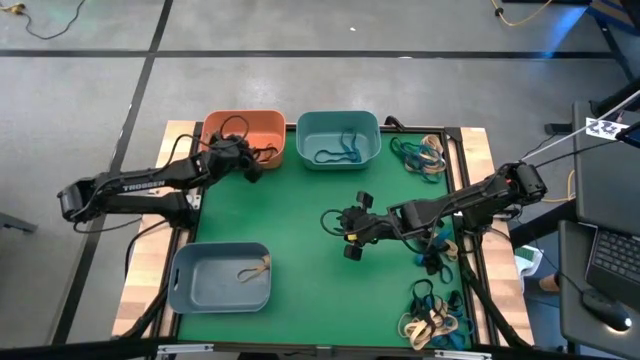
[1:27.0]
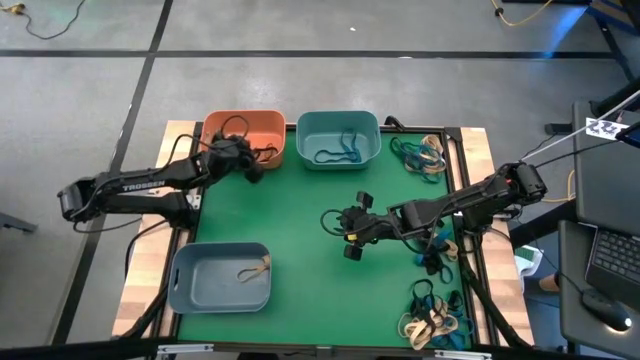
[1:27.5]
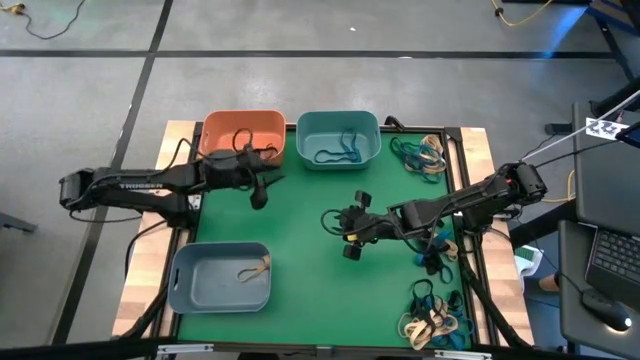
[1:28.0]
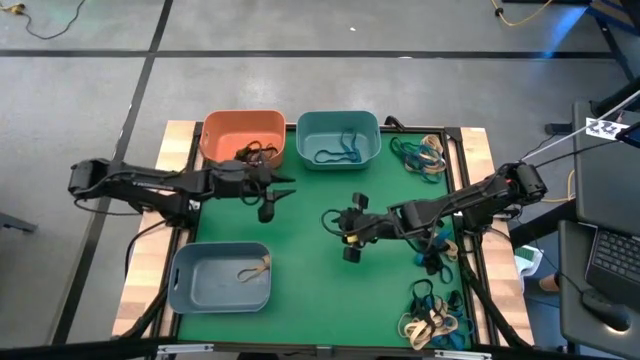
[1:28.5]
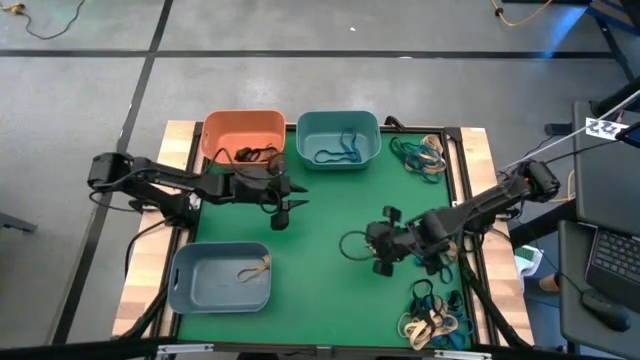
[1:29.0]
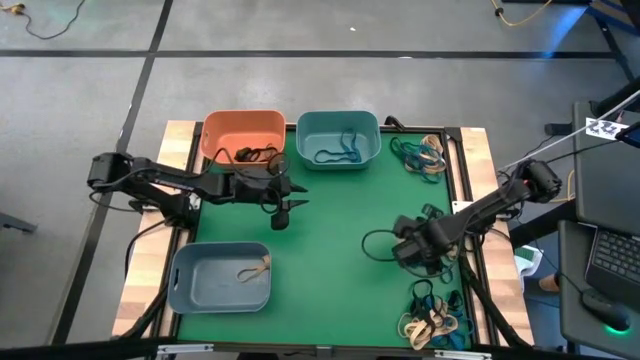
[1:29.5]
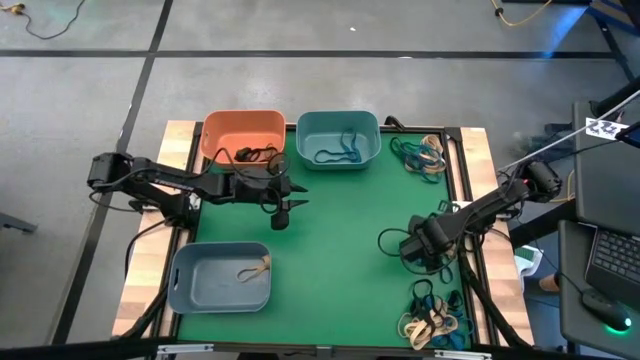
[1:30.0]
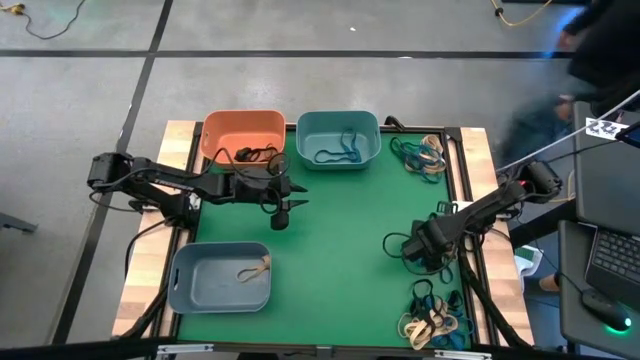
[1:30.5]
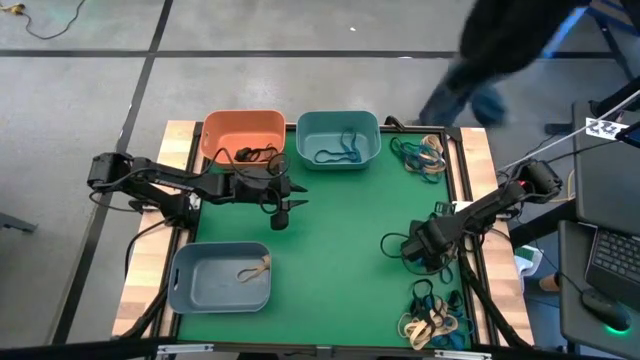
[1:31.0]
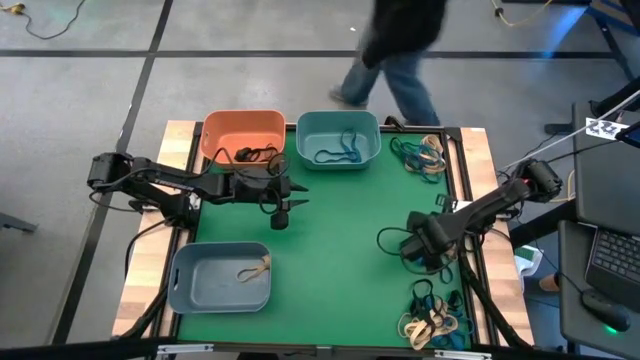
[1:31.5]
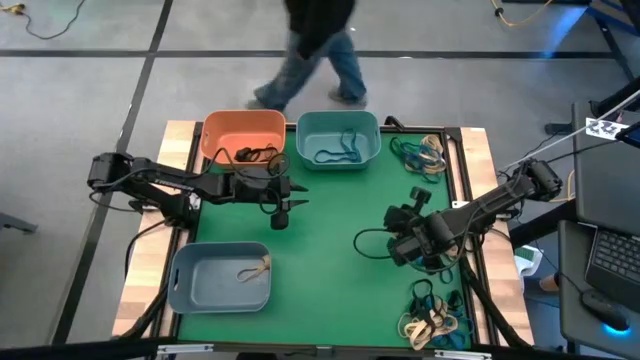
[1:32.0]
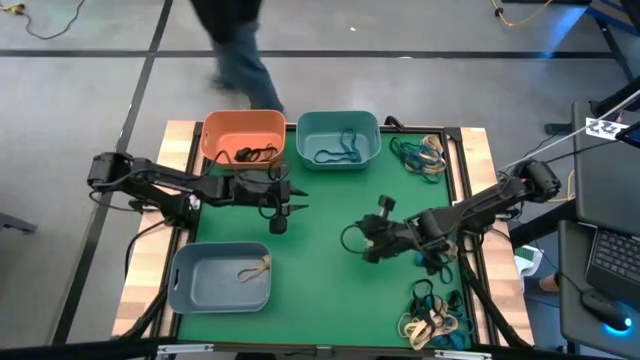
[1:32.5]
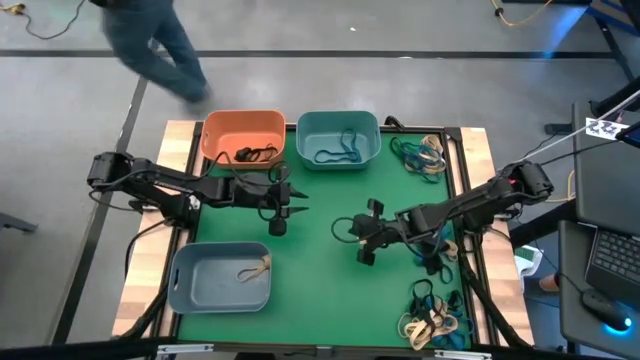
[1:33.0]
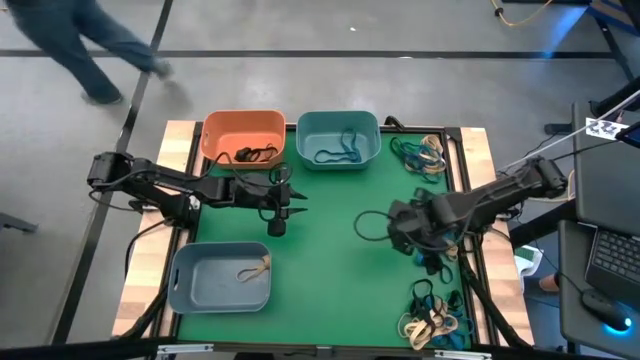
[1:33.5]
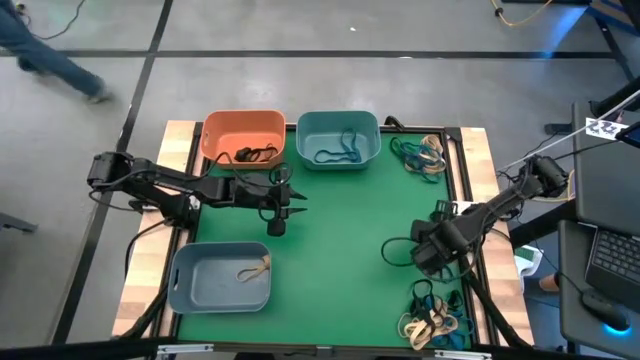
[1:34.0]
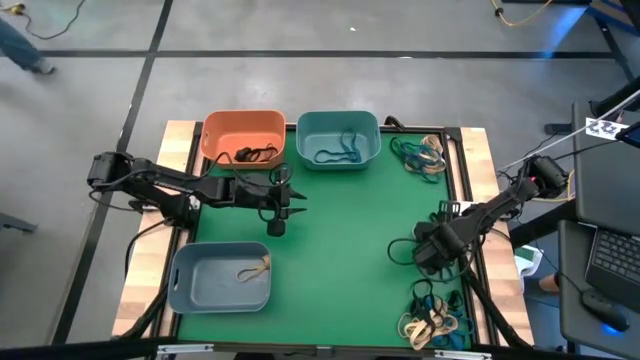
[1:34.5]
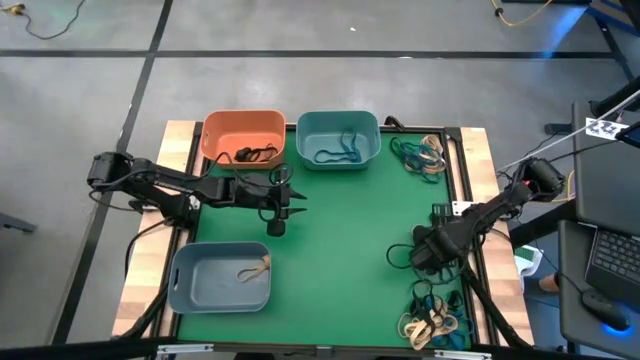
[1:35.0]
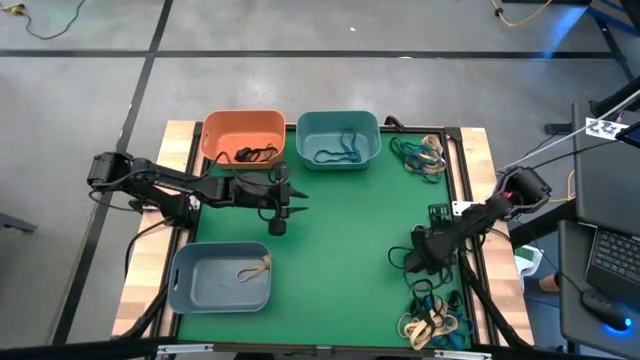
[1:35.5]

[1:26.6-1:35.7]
Task: Sort rubber bands into baskets
Put the blue rubber band into the green bin

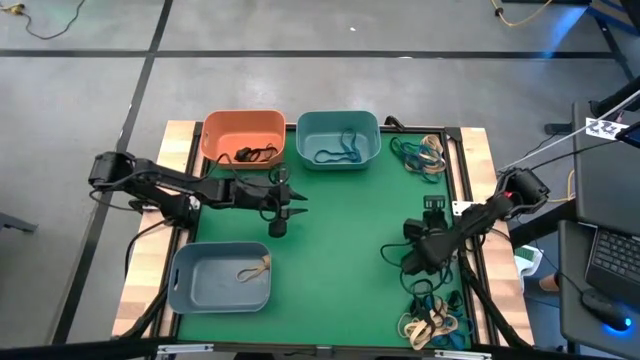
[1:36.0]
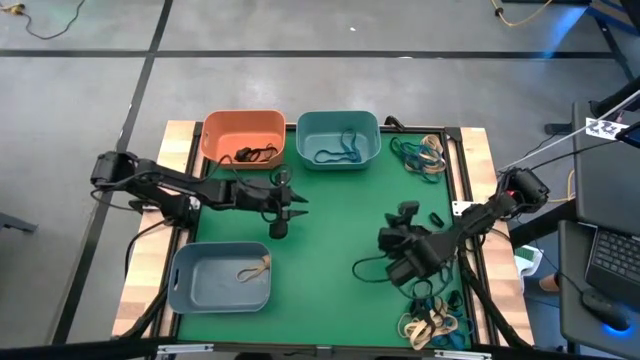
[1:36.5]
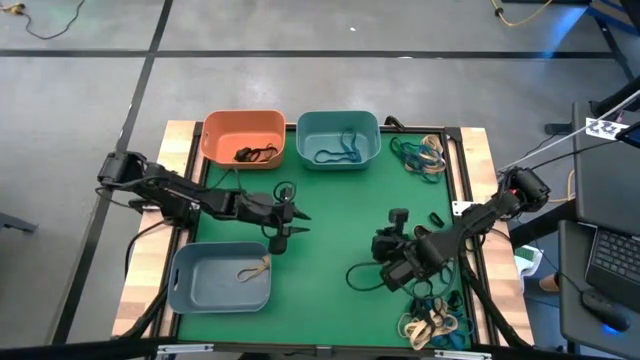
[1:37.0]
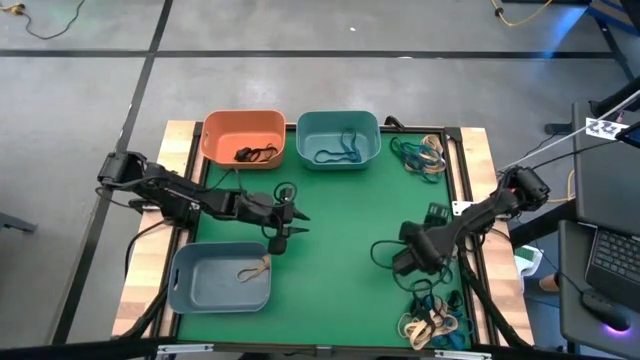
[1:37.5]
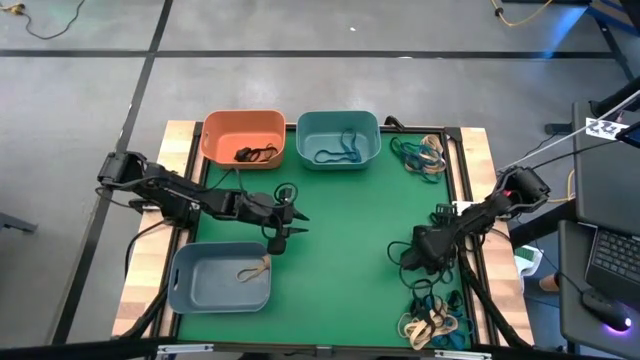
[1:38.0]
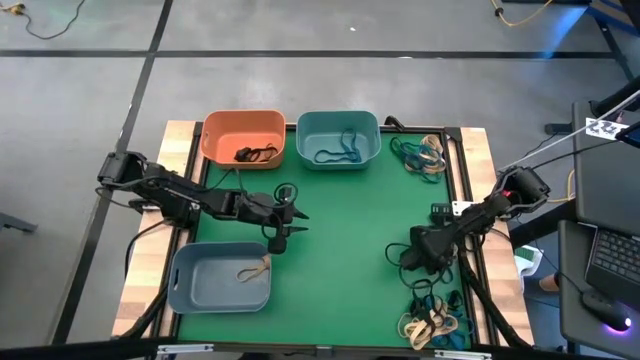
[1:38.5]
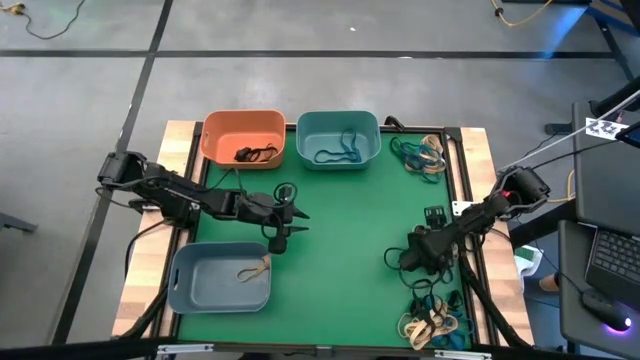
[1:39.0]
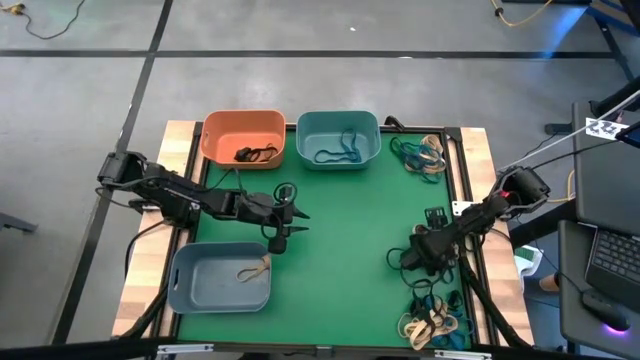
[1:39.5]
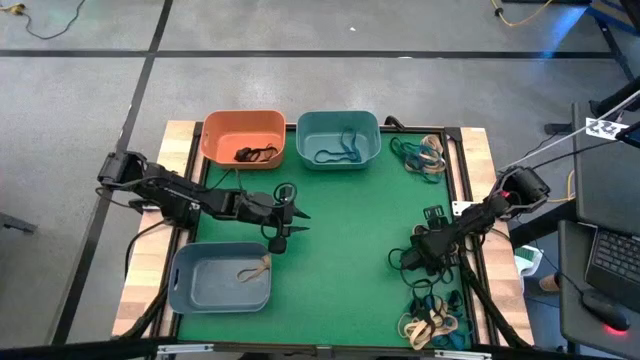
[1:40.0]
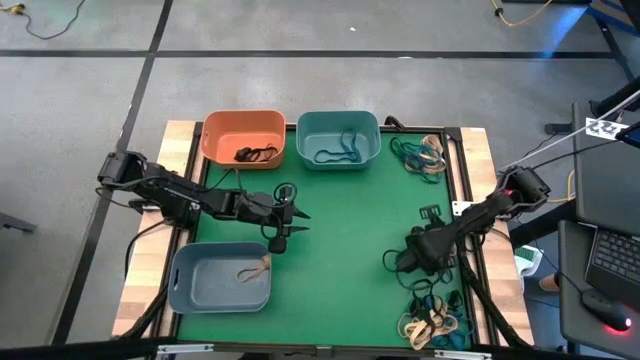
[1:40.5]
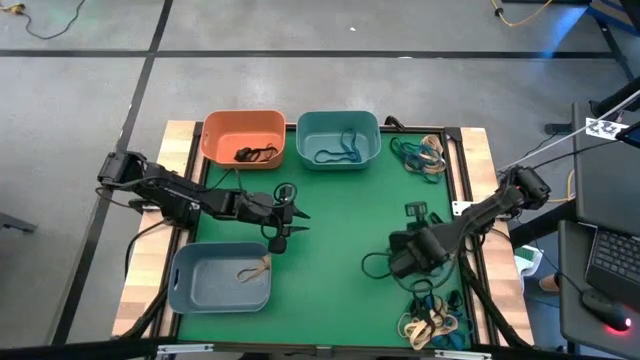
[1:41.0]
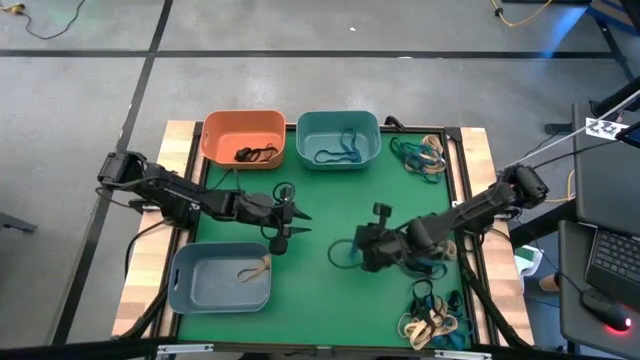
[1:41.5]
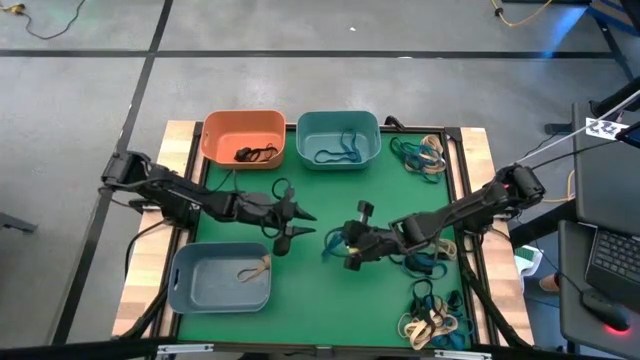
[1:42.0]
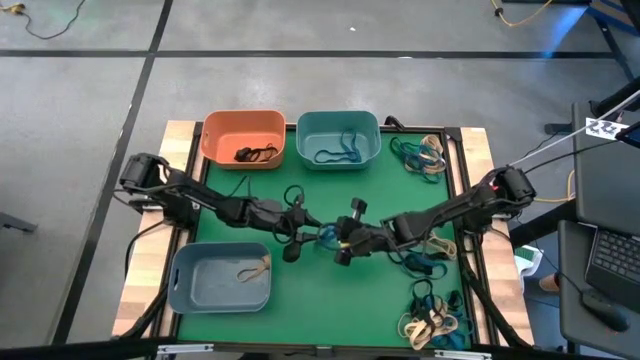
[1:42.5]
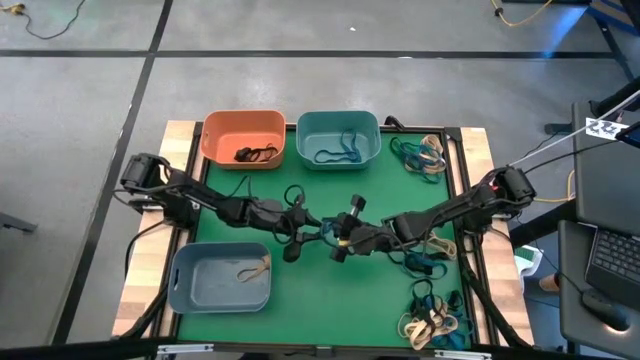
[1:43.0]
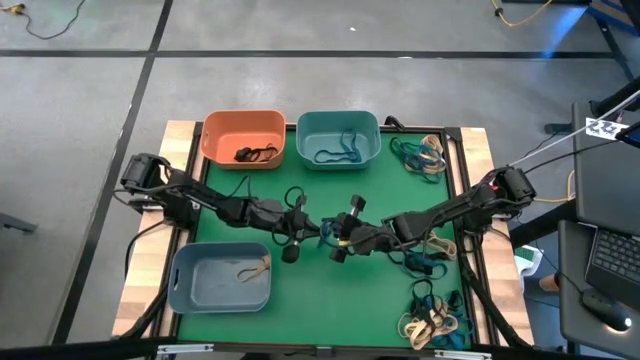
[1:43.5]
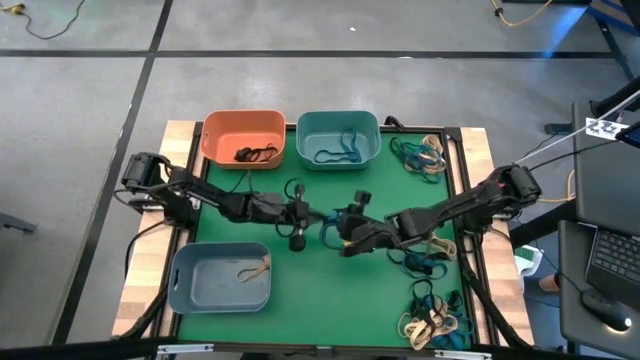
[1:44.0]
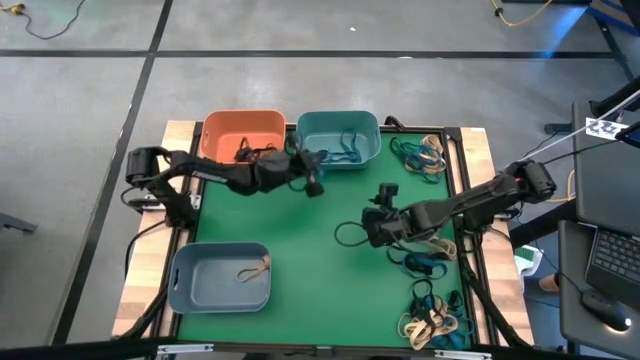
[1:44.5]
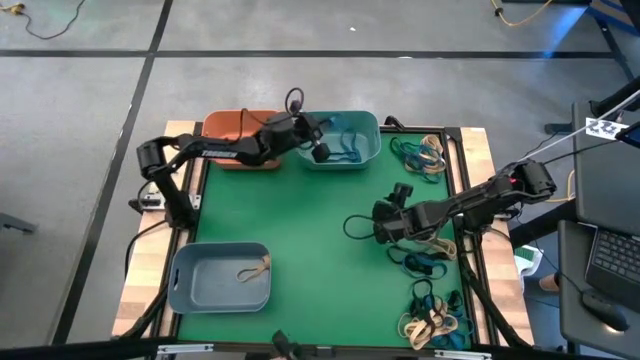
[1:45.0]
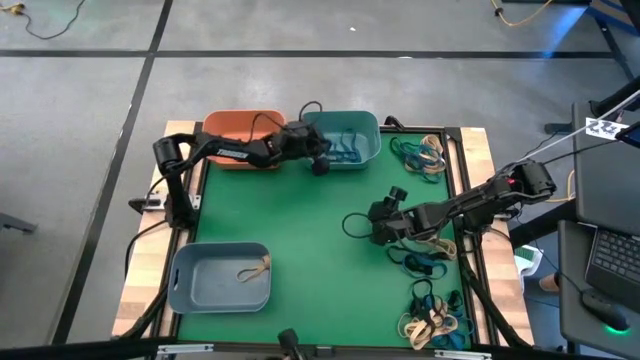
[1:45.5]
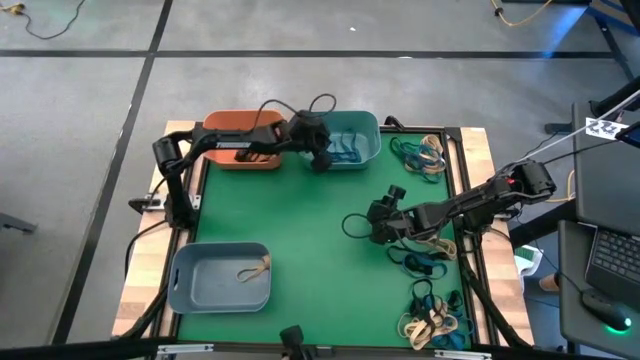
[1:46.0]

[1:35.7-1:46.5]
Put the blue rubber band into the green bin

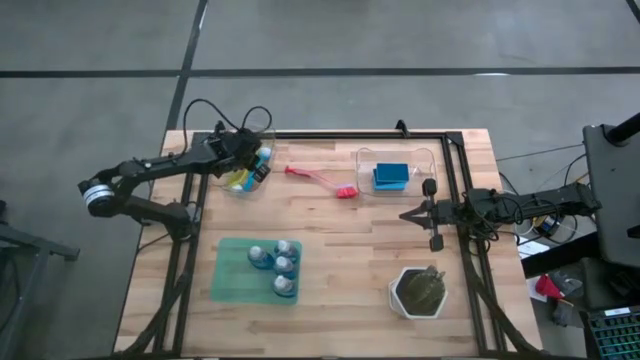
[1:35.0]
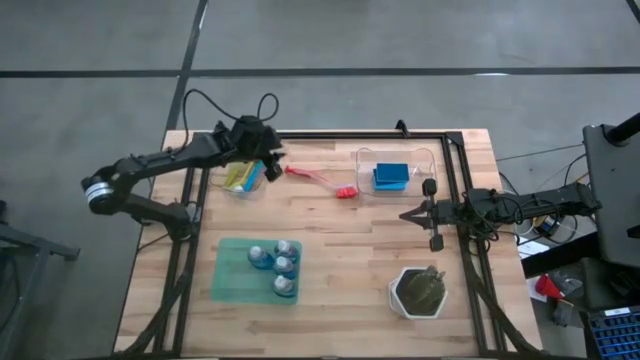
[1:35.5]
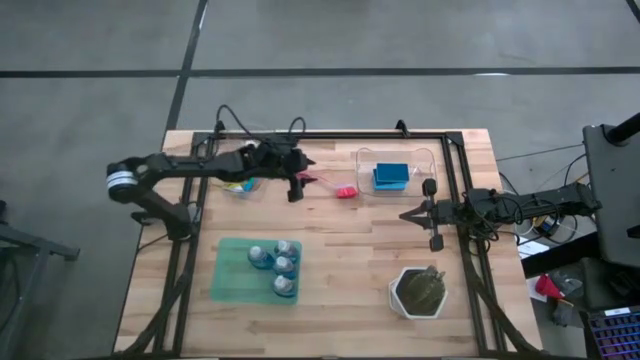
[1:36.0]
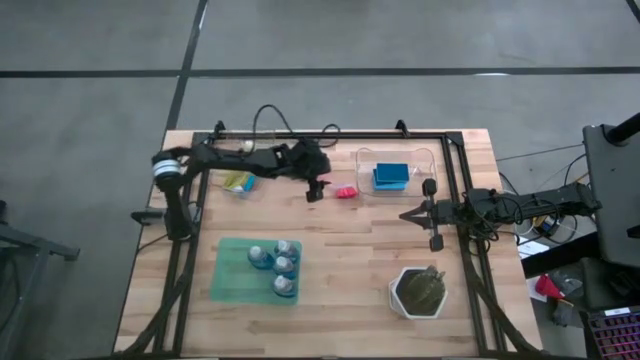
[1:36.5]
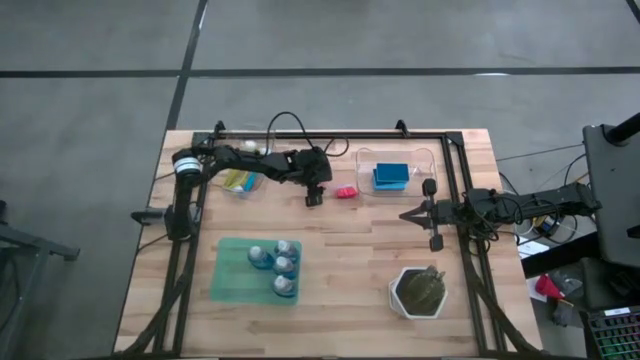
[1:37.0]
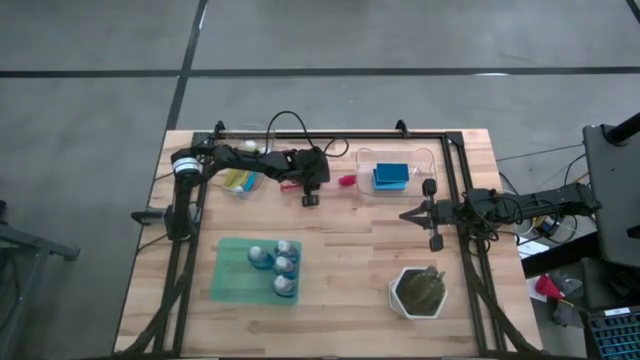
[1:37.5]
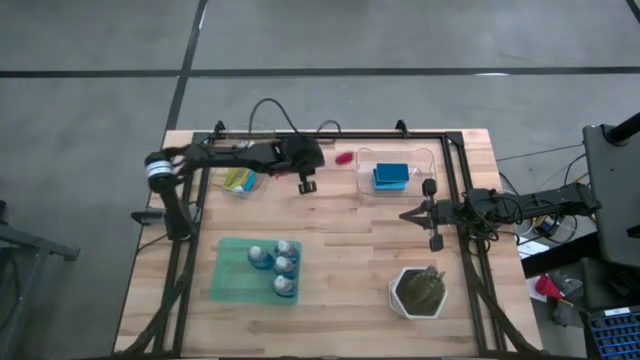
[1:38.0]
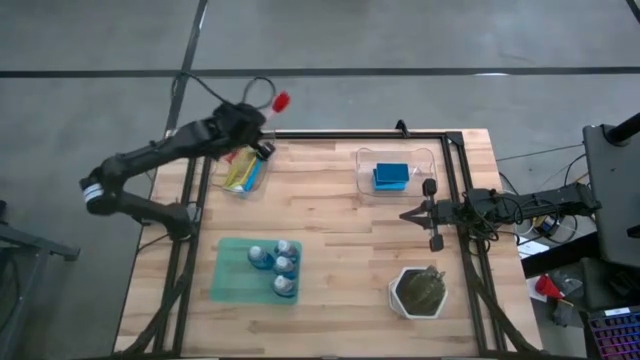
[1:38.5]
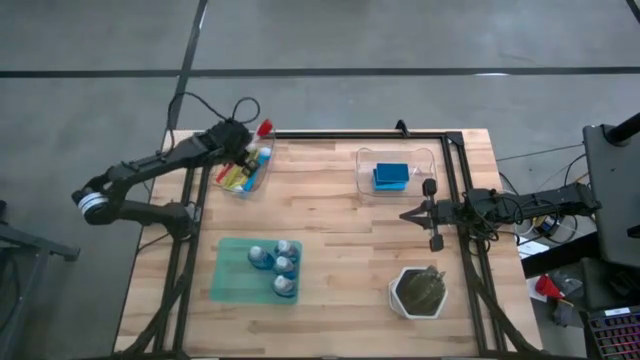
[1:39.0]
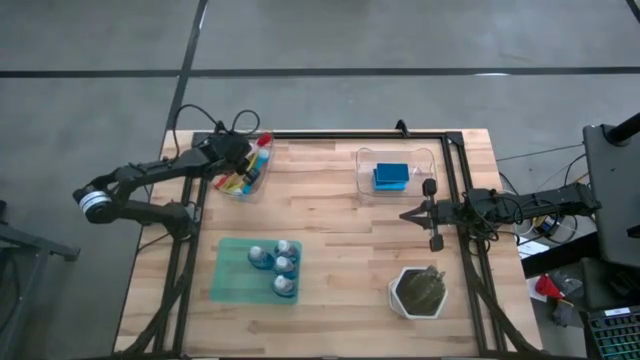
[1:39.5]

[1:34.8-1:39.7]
Task: Pick & Place Kitchen Sink Supplies
Put the red dishwashing brush into the left transparent bin
